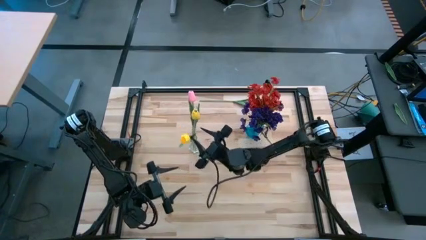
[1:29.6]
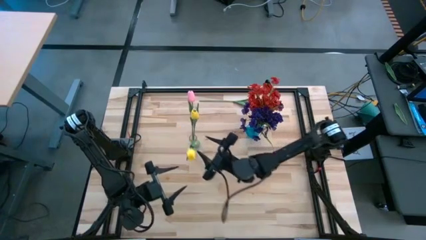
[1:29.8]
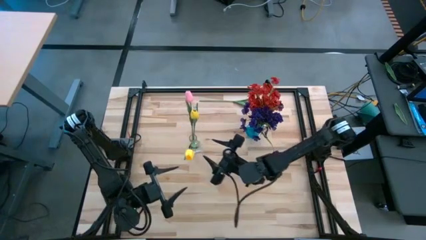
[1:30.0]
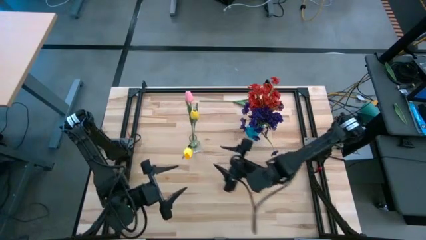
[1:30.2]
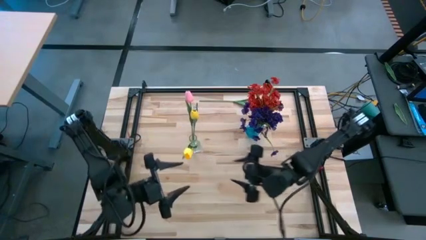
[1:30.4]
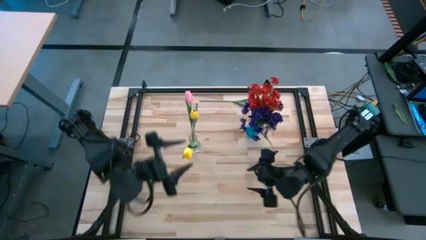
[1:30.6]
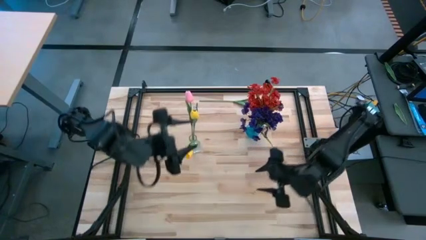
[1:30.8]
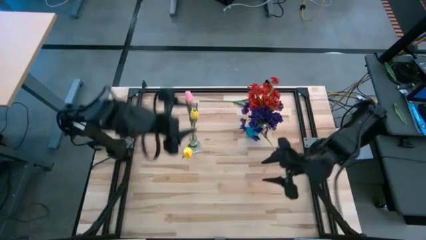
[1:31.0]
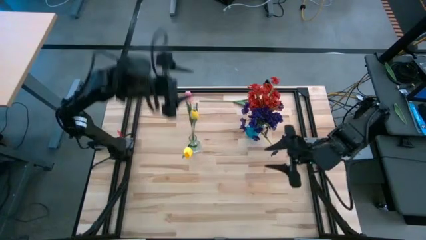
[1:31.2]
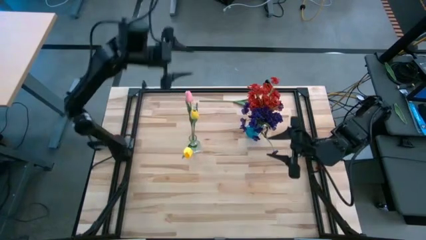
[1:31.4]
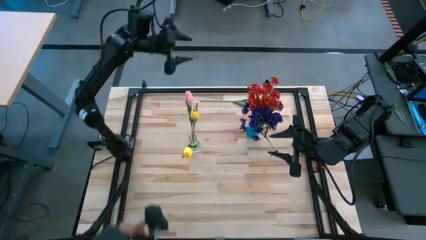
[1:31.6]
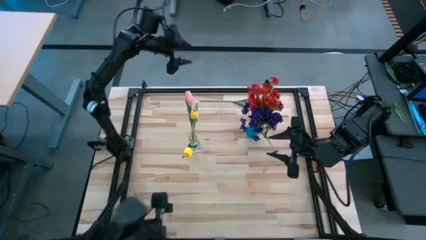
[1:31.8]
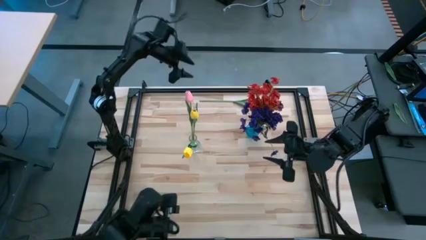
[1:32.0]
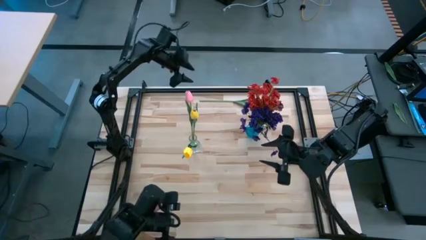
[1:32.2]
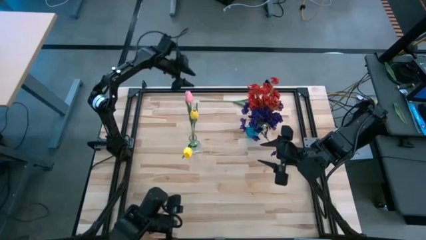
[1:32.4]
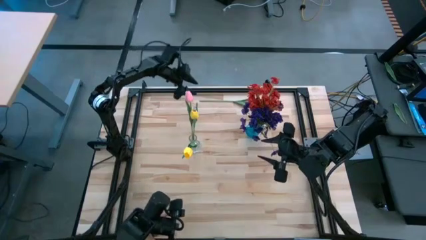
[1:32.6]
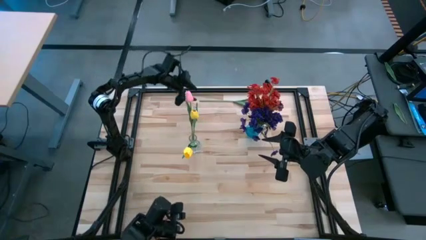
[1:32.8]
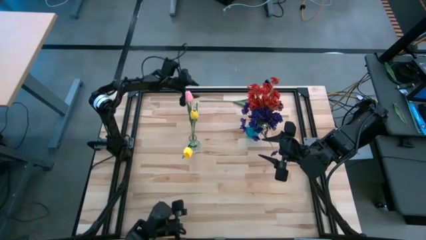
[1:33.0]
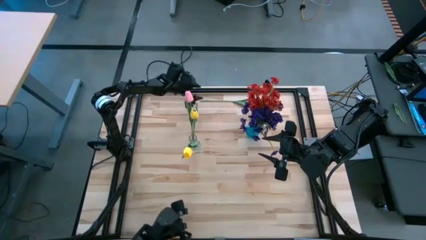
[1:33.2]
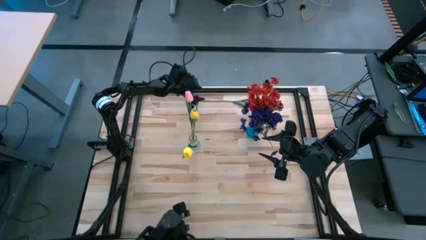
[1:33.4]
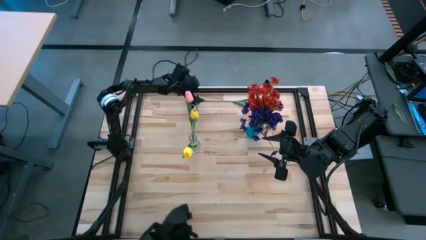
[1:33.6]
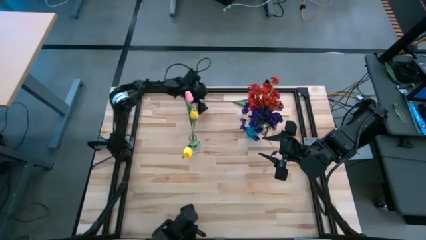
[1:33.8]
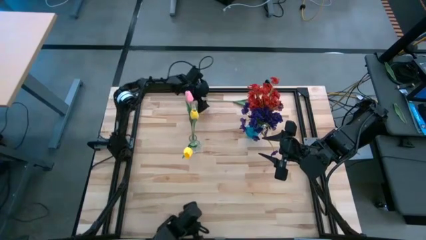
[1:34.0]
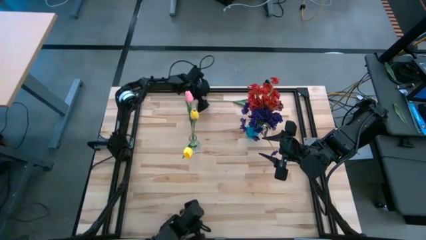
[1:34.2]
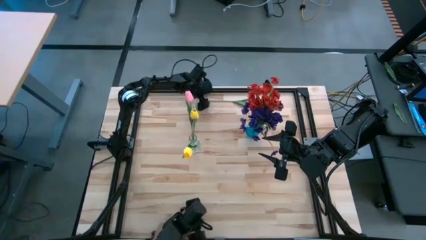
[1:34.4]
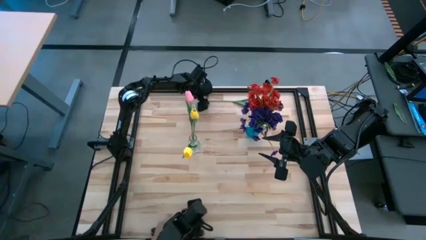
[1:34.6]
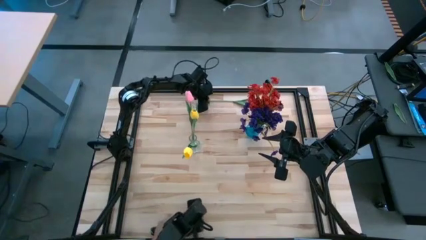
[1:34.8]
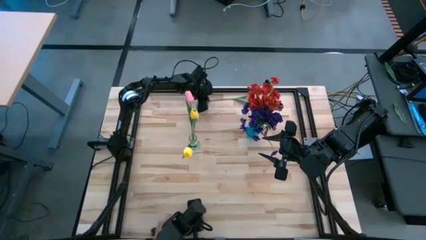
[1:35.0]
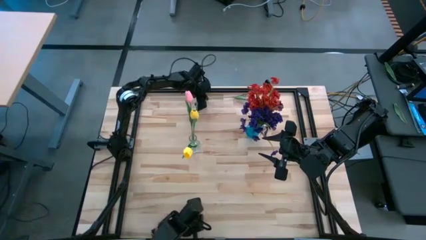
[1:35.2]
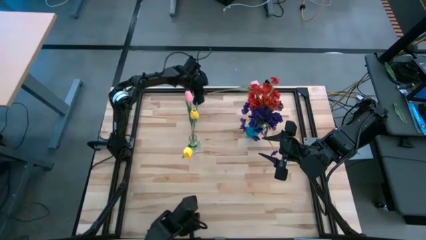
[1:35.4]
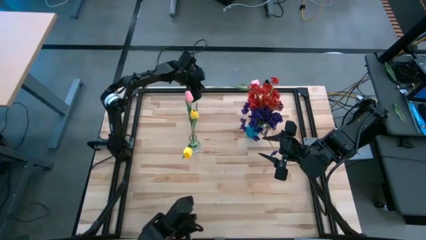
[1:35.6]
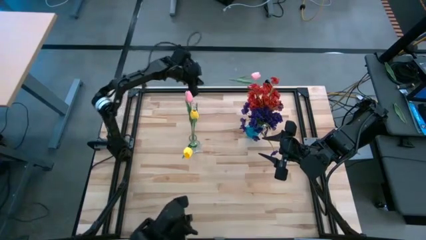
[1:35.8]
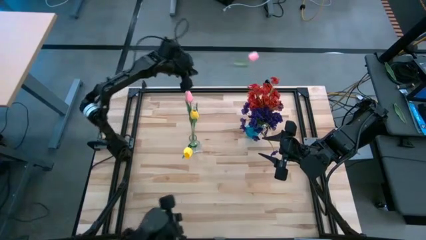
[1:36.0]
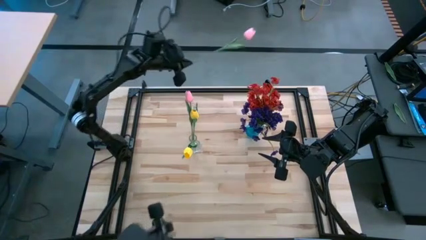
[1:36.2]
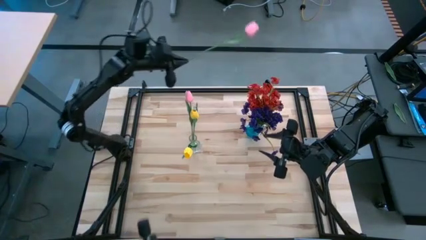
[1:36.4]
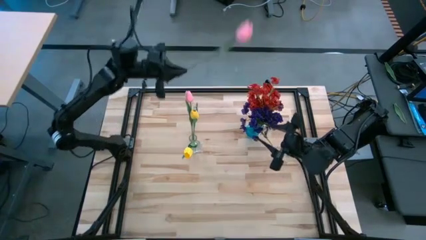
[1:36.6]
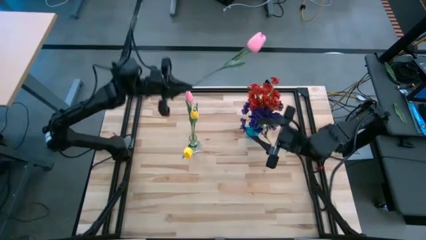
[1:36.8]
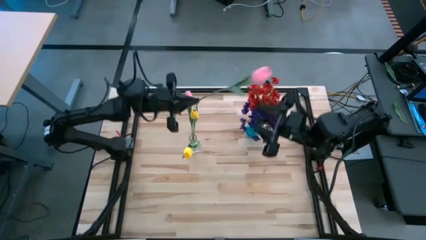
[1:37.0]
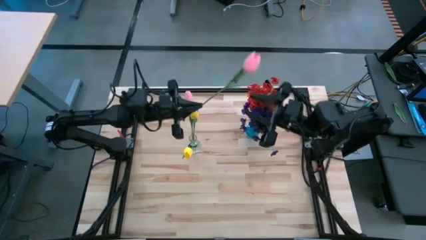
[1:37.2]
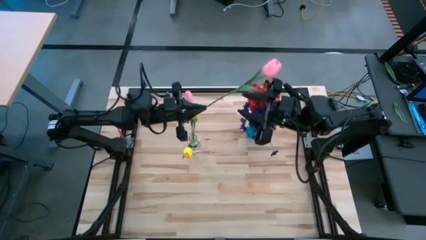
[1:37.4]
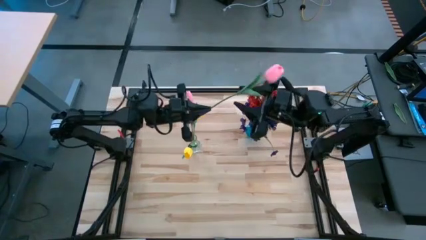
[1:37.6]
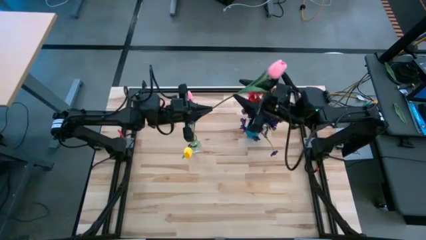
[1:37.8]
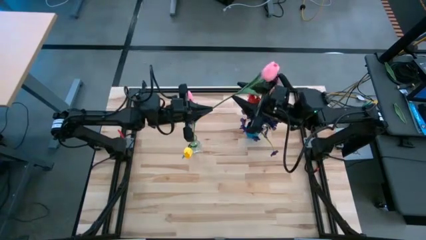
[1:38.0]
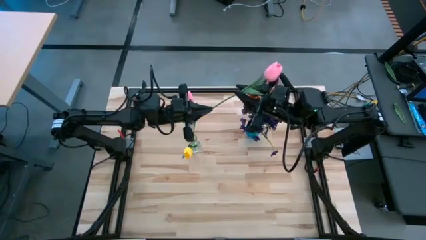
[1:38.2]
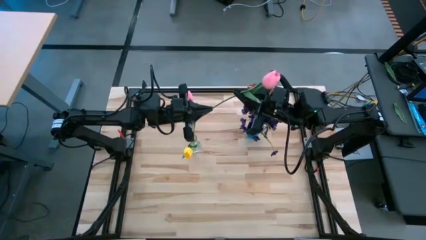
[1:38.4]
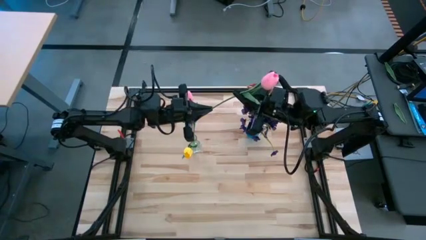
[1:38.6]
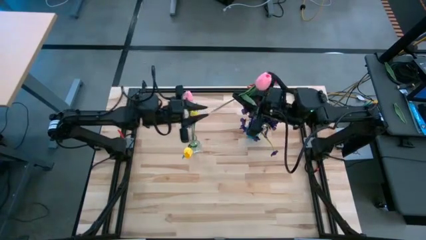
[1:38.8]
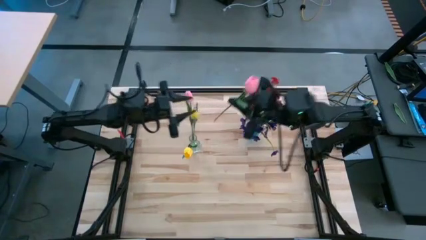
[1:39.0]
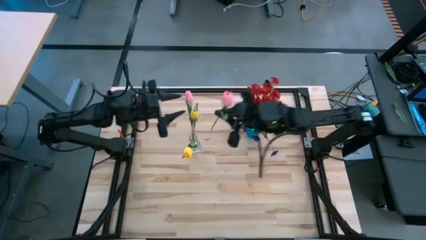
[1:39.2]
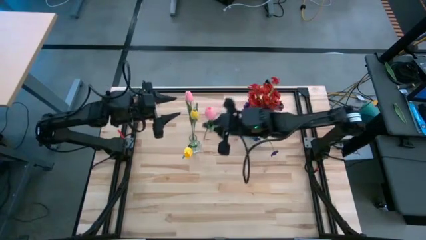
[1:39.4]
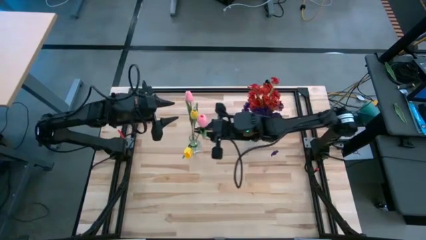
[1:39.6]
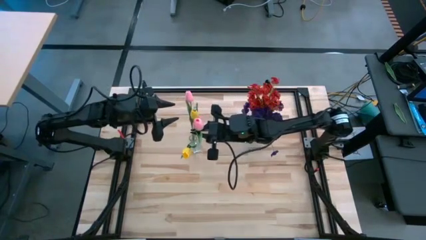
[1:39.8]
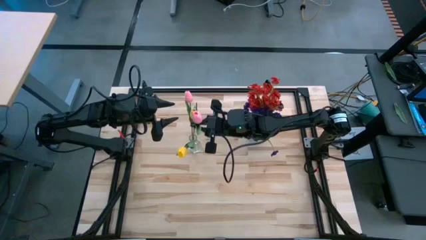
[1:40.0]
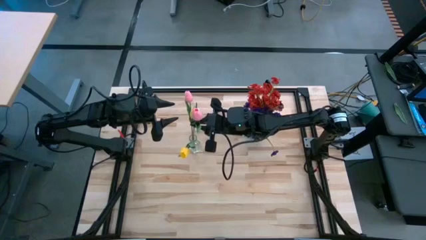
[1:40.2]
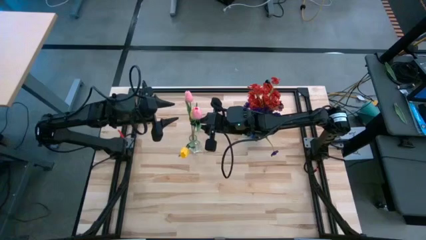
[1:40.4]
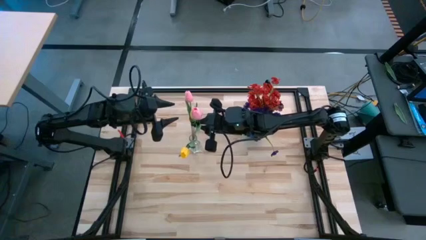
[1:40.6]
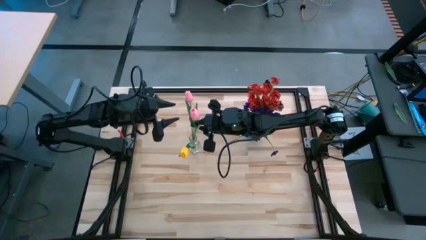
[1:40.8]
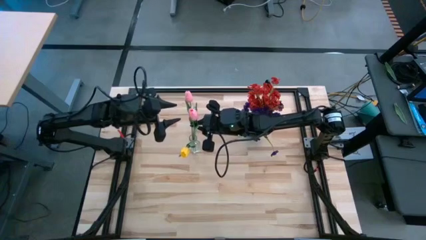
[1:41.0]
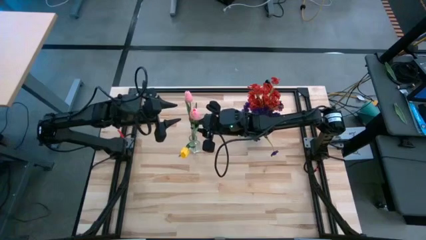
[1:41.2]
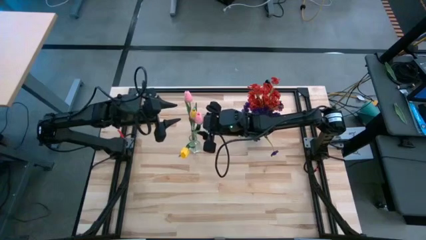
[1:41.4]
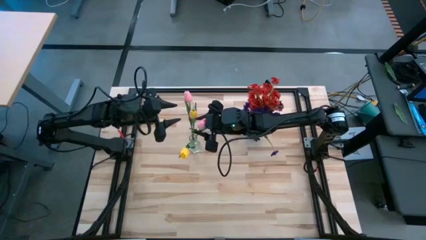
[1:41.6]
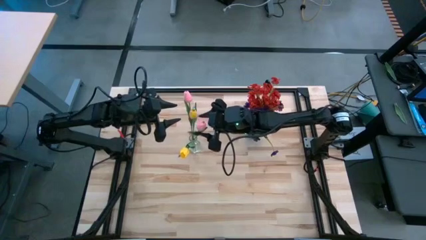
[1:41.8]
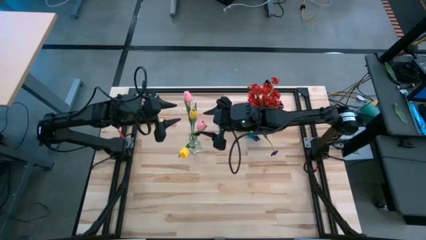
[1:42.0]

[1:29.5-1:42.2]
Task: Sort flowers into vase by color
Put the pink tulip into the transparent vase

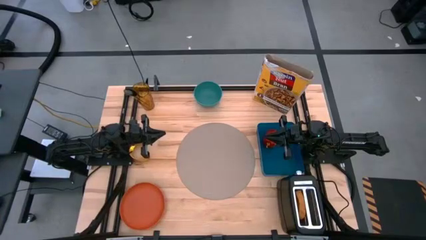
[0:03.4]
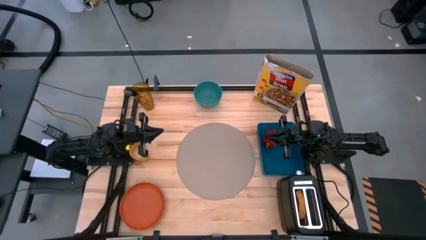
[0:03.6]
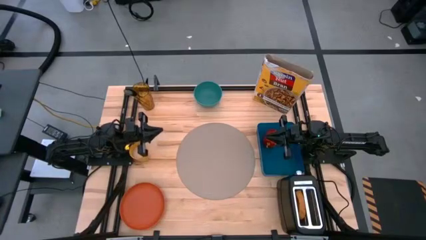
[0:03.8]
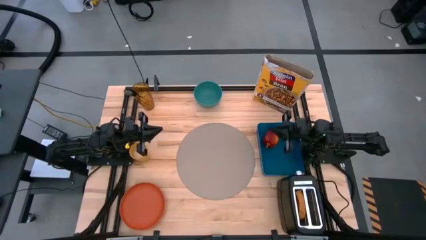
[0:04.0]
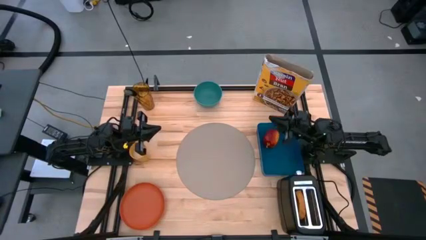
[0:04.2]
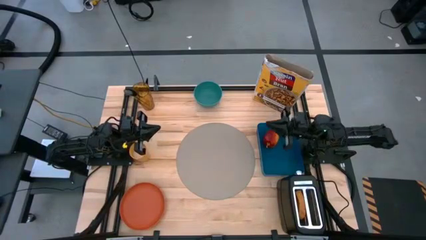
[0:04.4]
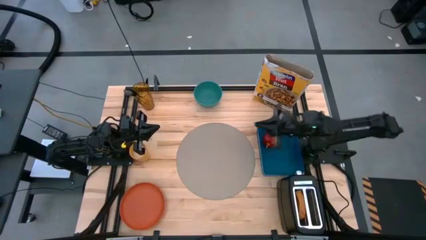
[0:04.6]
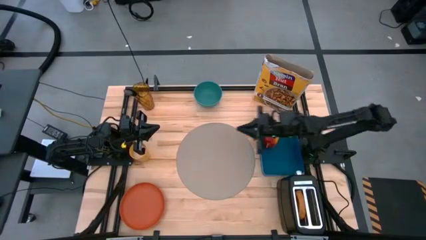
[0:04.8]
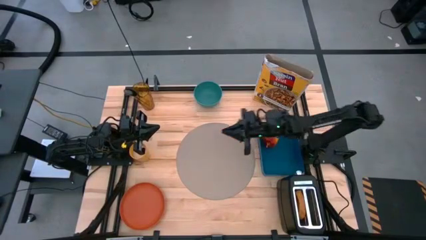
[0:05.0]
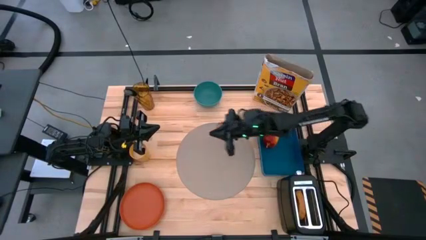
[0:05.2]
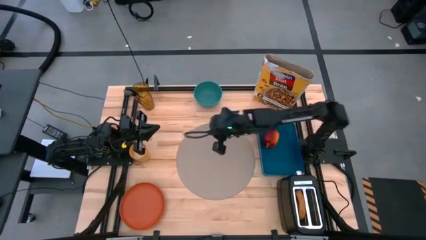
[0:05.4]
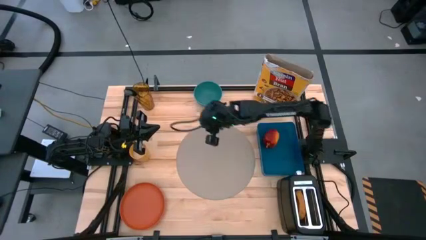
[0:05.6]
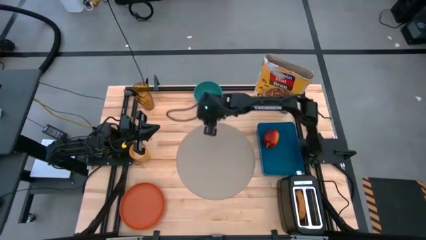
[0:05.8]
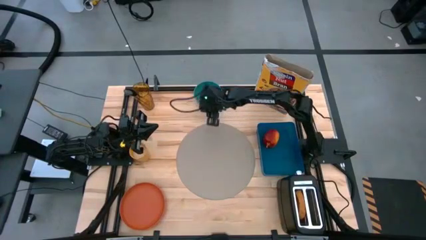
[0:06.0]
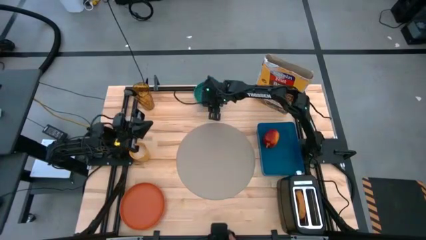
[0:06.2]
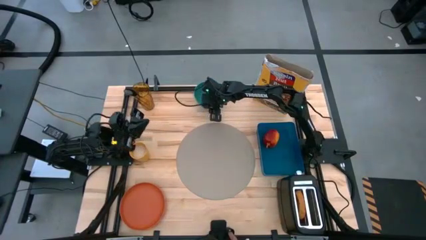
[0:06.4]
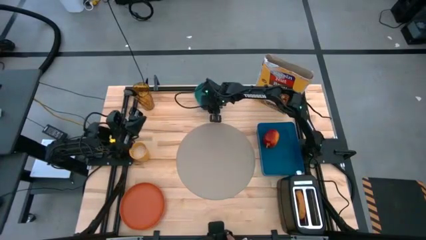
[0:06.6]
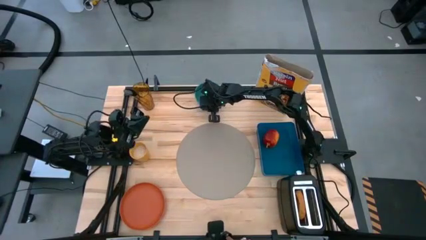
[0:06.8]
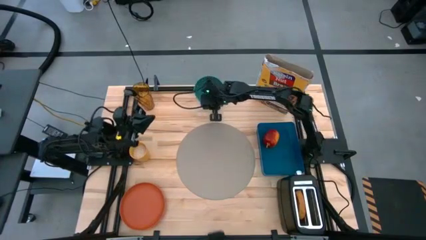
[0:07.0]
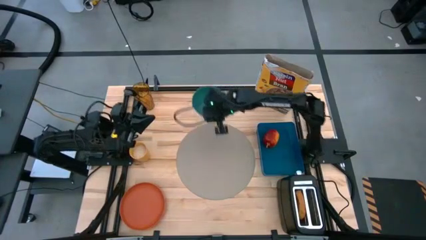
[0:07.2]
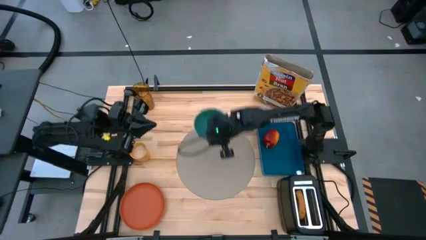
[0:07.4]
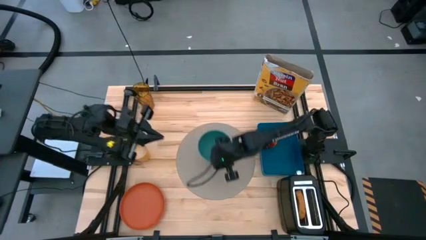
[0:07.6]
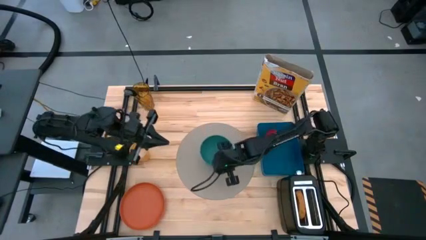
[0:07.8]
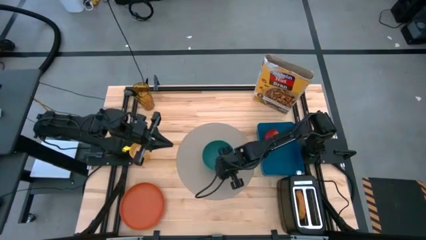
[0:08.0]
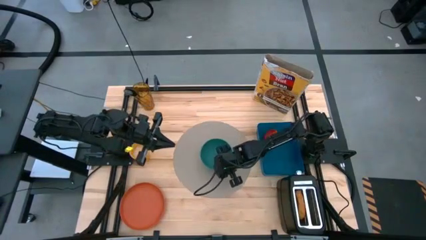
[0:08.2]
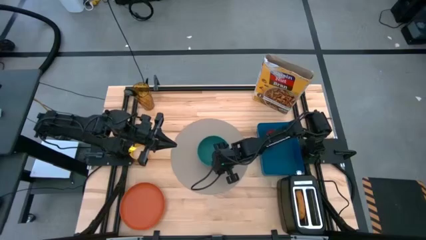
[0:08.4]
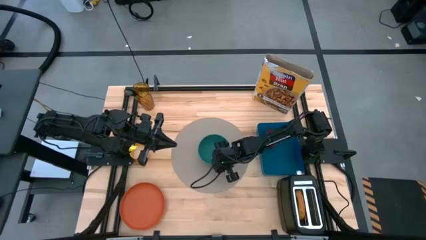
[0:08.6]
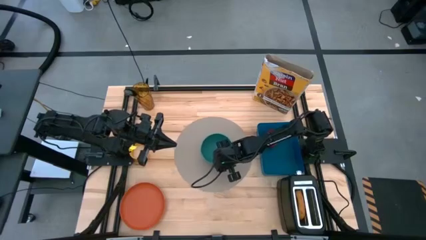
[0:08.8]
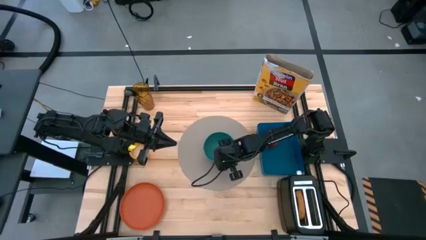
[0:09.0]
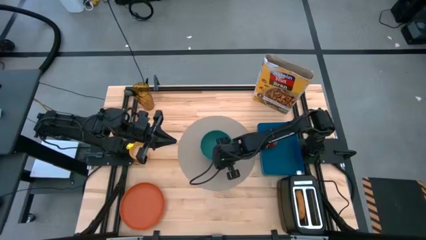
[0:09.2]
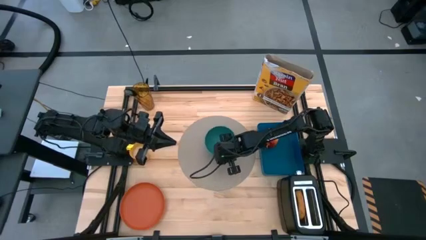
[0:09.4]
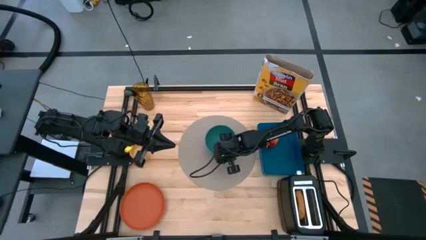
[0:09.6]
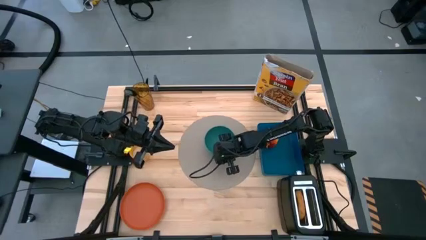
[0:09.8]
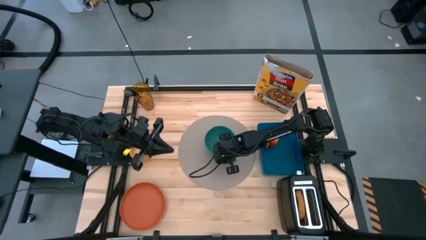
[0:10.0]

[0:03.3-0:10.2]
Task: Arrange a breakfast setting
Put the green bowl in the center of the brown table mat
